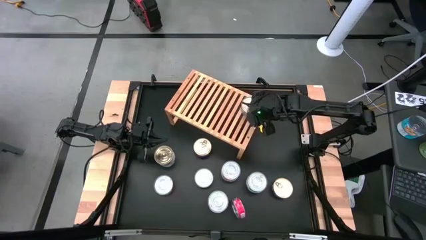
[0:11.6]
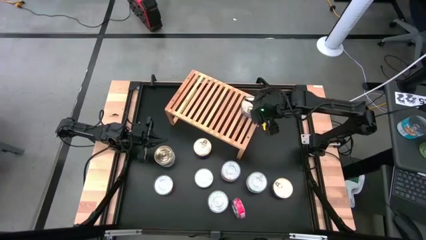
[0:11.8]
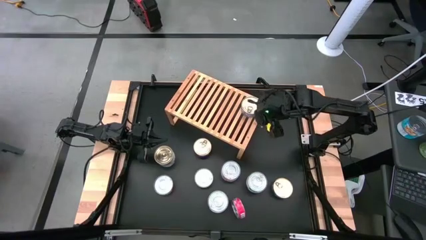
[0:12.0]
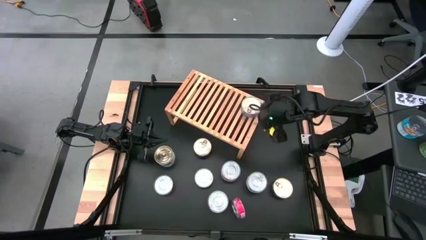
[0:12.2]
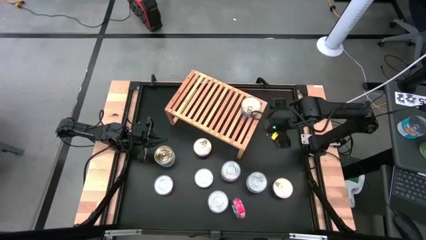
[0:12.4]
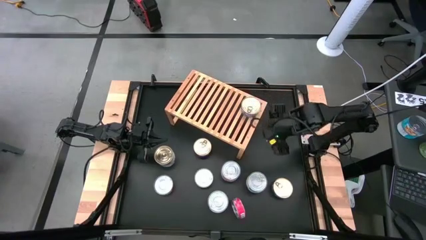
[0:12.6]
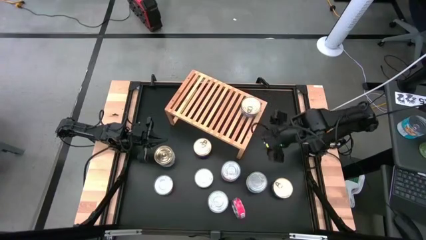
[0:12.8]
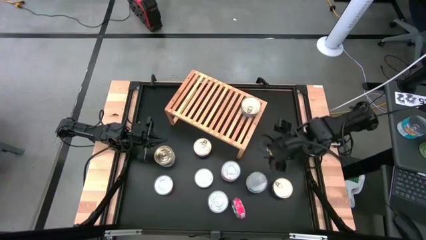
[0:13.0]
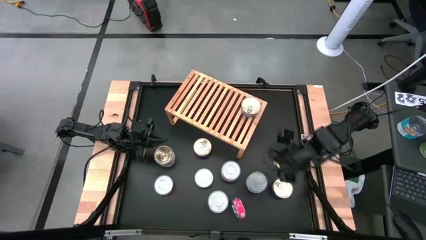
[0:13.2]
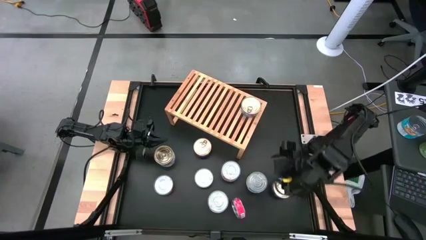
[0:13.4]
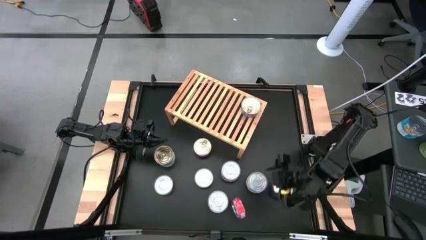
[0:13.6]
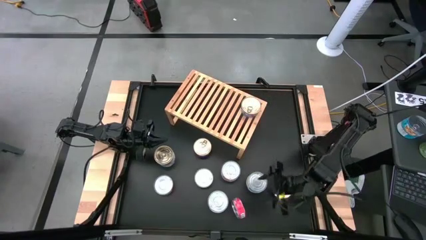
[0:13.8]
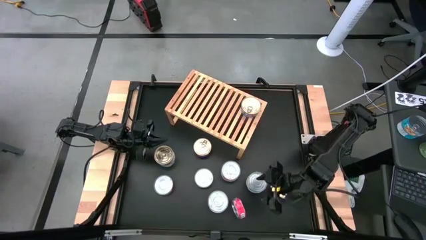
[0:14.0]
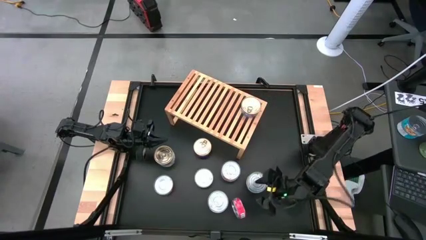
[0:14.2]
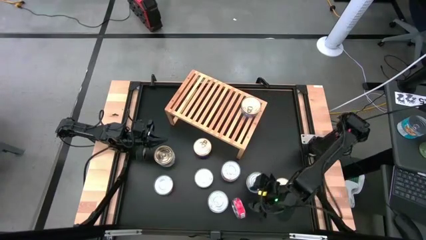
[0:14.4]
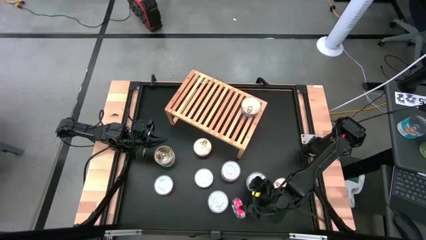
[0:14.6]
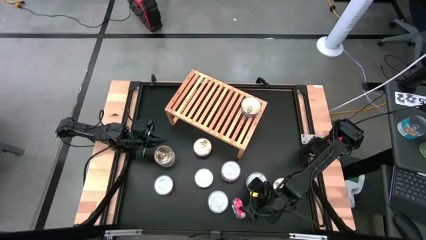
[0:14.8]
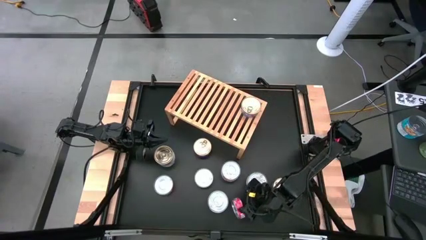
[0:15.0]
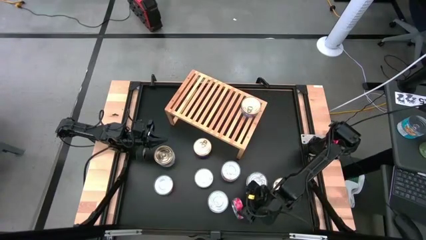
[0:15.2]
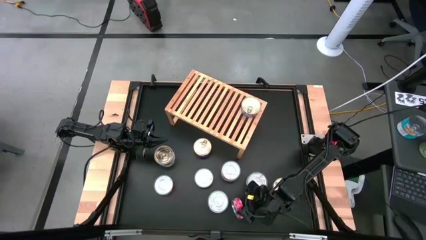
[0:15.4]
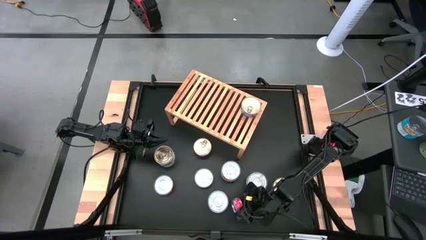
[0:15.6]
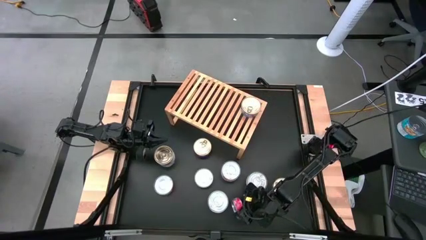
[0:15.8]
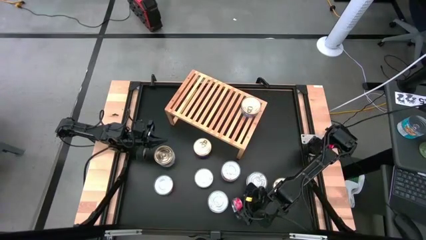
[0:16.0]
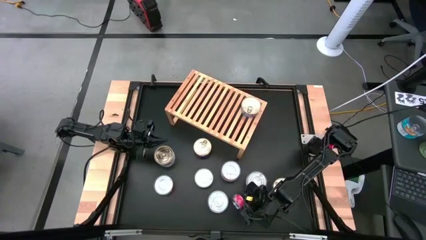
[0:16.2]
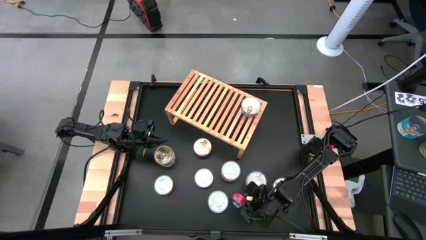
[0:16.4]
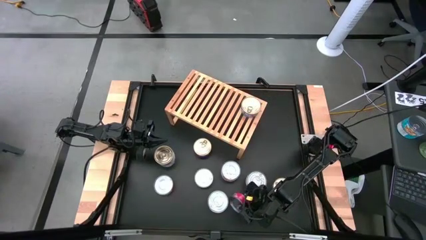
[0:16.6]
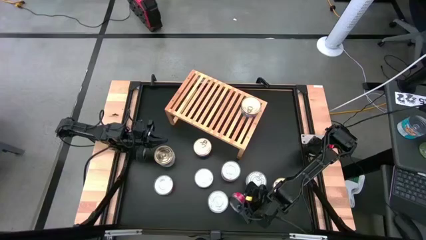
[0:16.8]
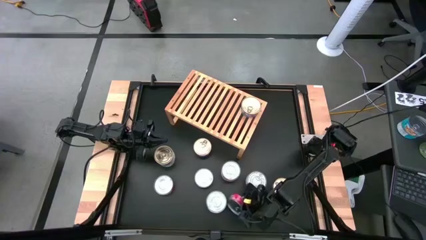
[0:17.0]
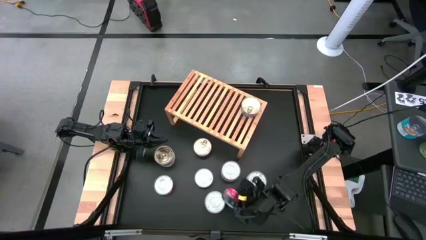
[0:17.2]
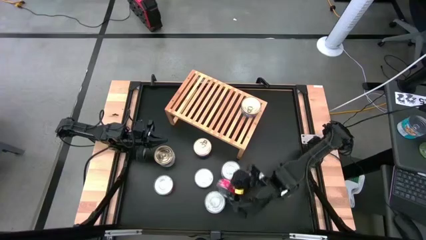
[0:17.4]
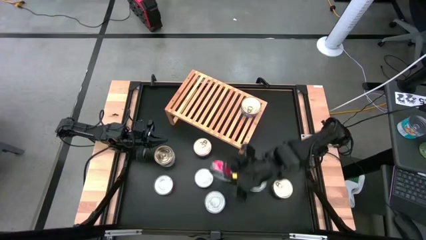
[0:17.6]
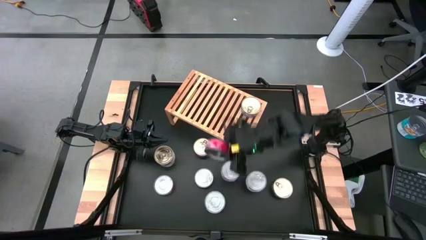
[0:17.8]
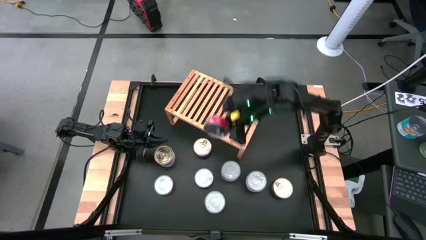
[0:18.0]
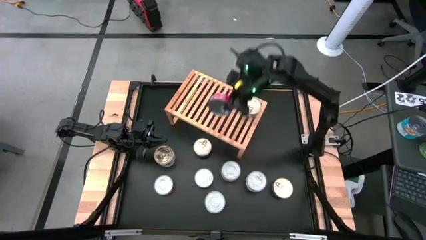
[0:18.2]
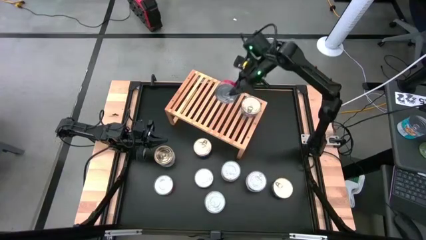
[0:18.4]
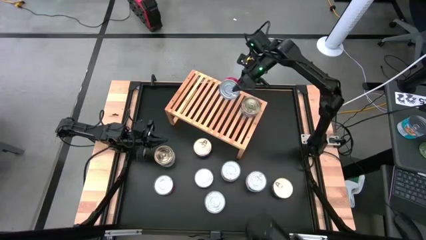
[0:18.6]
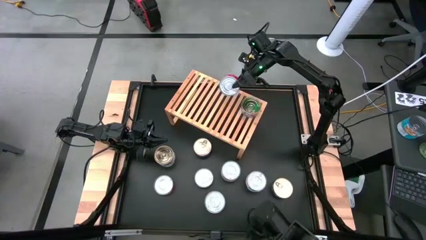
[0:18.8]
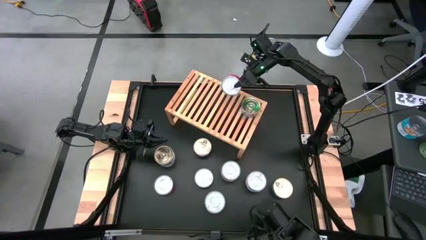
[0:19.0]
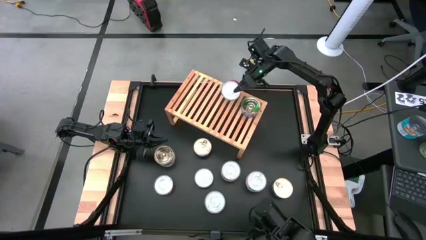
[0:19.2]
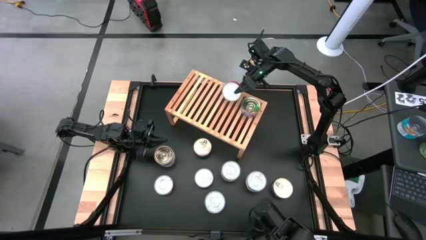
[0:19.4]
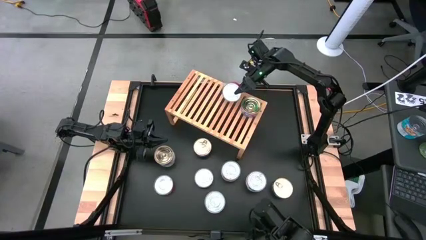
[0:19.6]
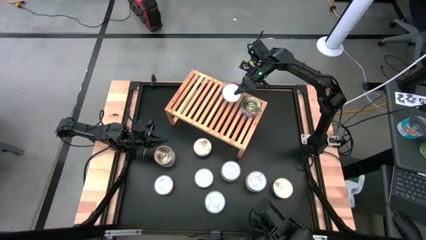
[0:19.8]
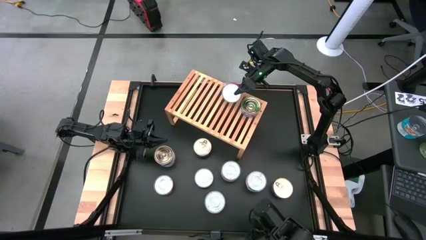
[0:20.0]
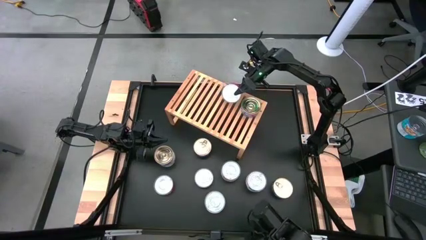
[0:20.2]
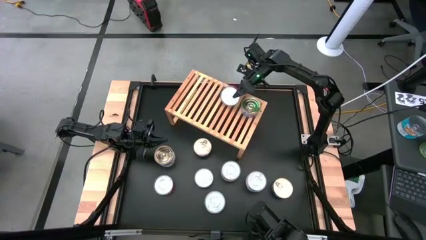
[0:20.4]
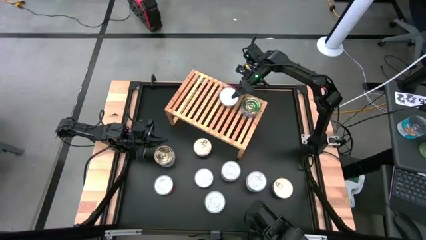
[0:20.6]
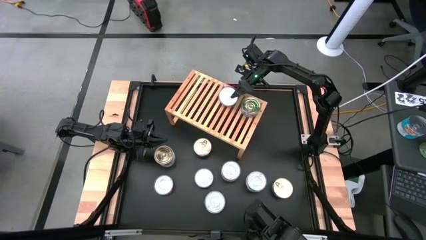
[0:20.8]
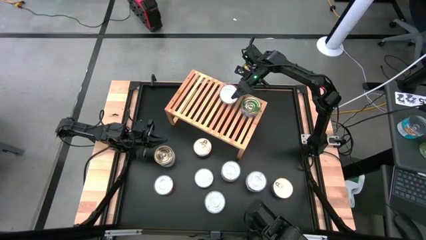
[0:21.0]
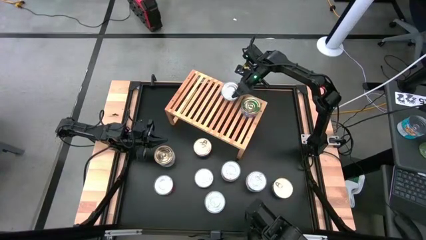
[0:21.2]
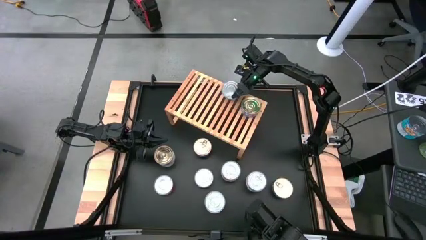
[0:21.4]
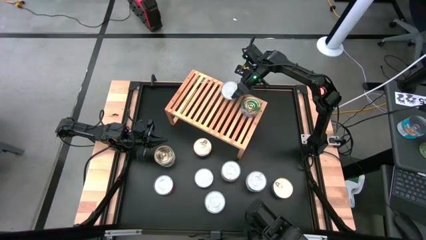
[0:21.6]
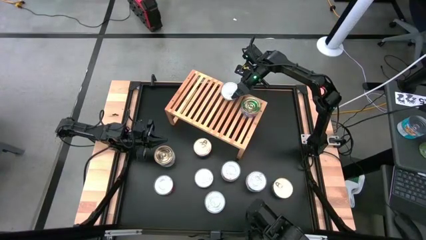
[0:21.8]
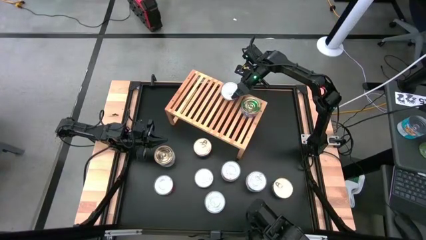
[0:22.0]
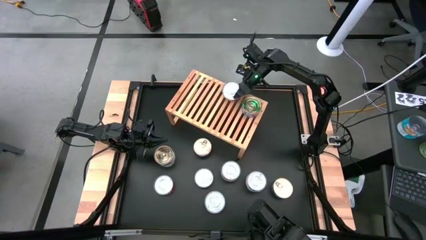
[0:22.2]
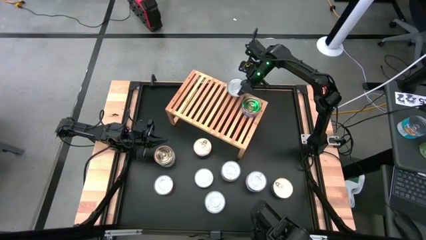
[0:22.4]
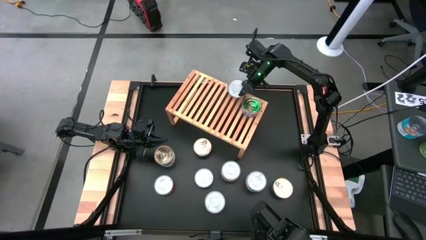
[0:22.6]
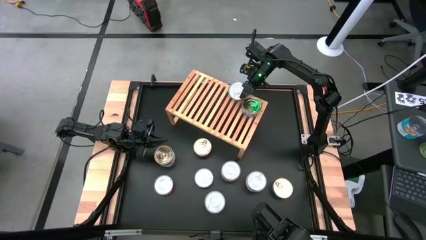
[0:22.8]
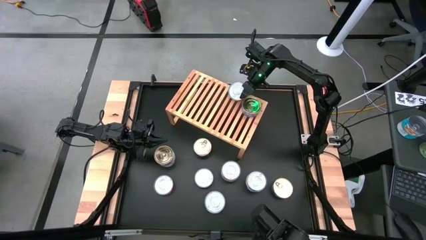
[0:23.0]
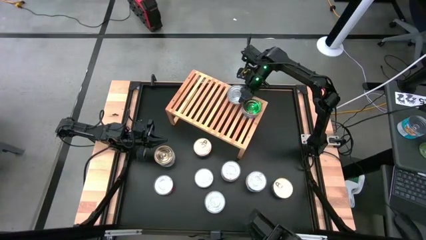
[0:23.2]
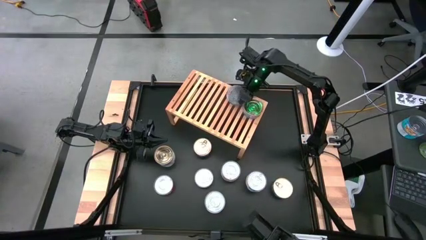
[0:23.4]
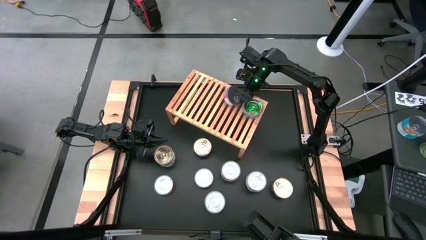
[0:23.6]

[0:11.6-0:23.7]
Task: Stack canned seafood by type on shelf
Put the red tuna can on the shelf

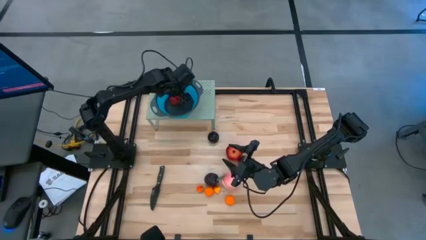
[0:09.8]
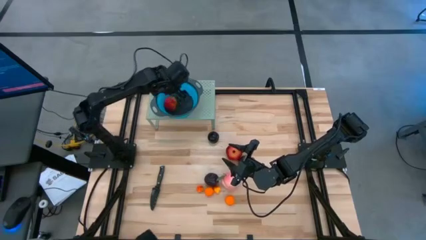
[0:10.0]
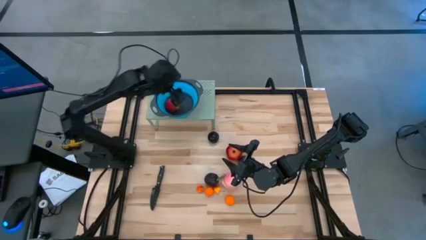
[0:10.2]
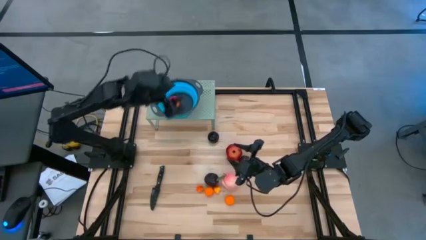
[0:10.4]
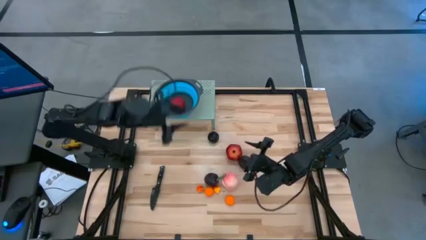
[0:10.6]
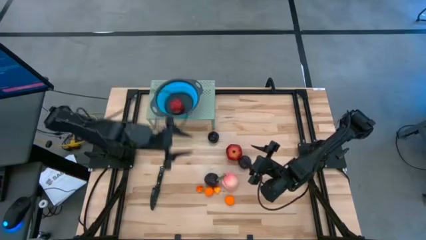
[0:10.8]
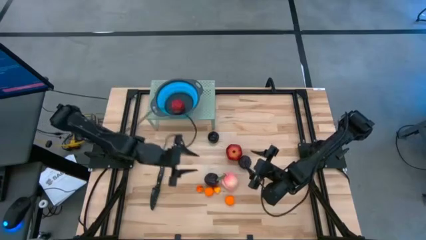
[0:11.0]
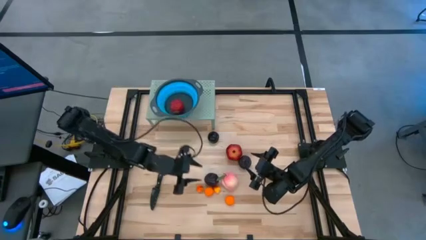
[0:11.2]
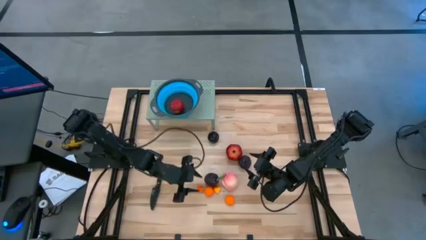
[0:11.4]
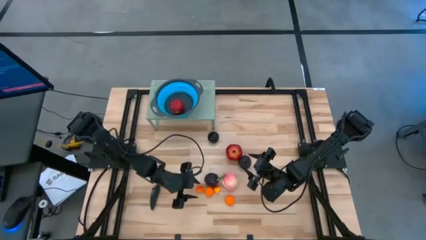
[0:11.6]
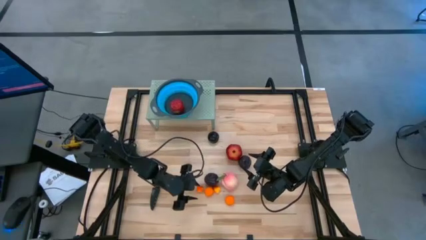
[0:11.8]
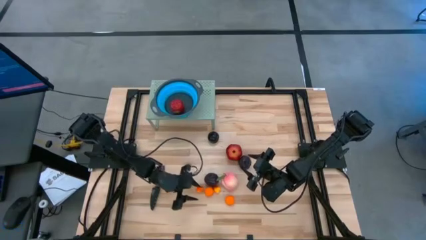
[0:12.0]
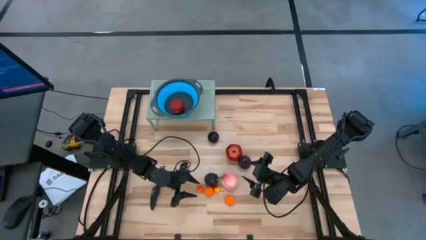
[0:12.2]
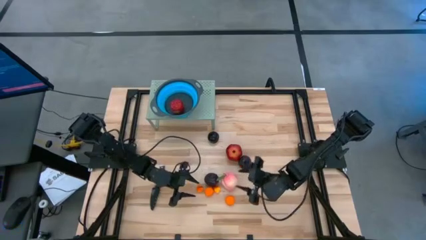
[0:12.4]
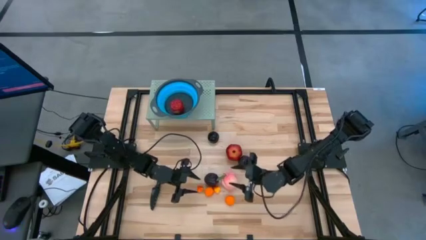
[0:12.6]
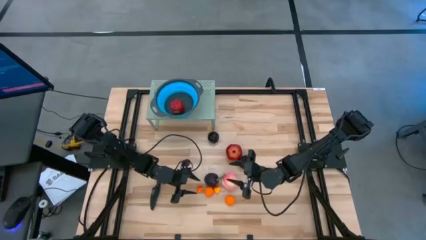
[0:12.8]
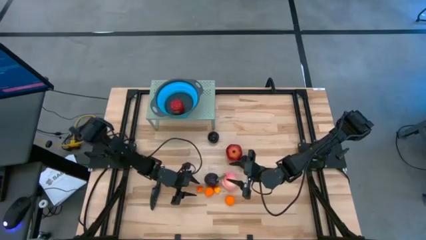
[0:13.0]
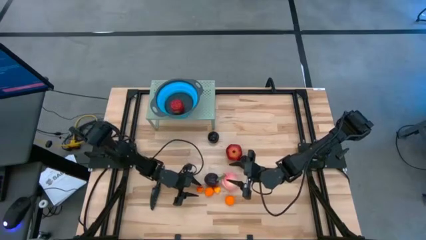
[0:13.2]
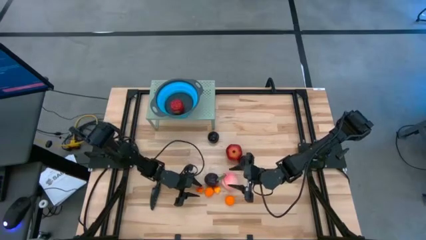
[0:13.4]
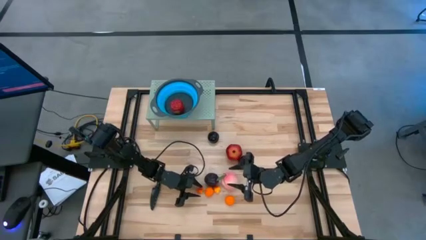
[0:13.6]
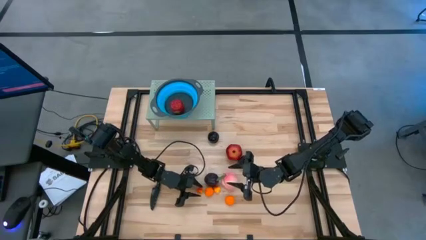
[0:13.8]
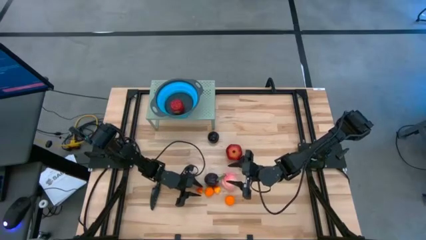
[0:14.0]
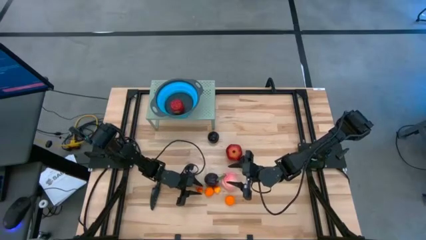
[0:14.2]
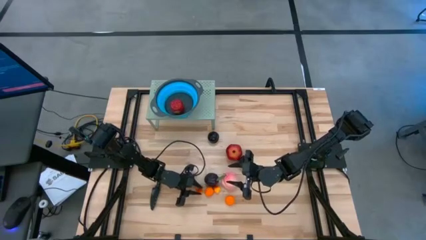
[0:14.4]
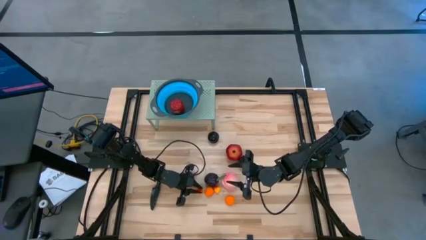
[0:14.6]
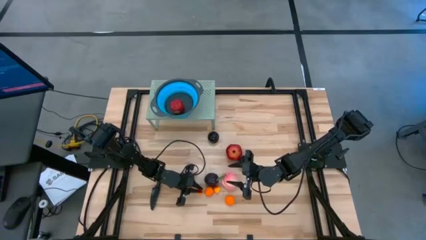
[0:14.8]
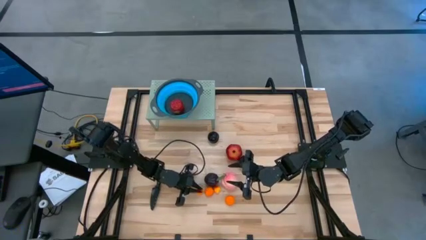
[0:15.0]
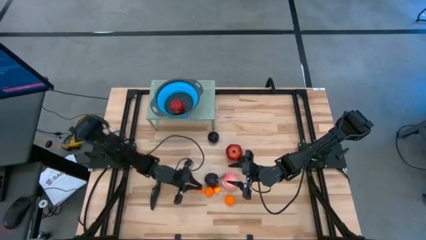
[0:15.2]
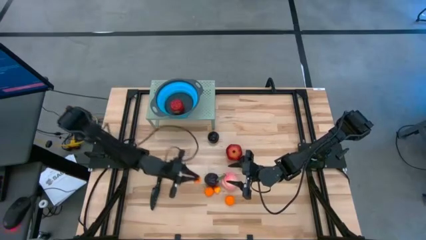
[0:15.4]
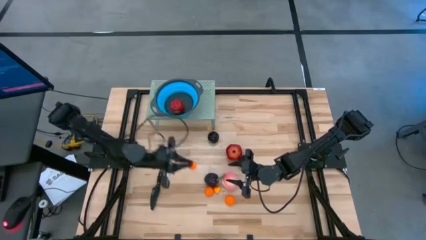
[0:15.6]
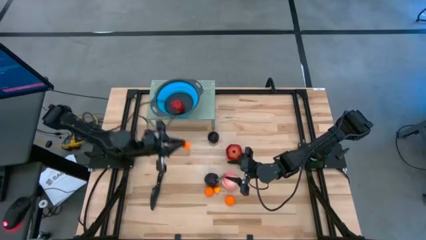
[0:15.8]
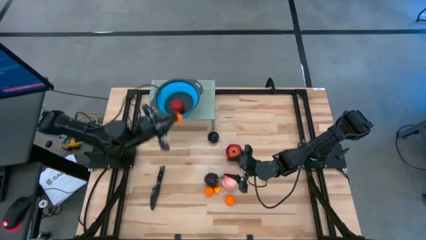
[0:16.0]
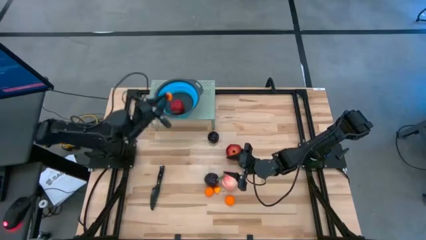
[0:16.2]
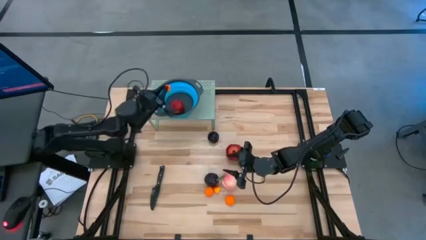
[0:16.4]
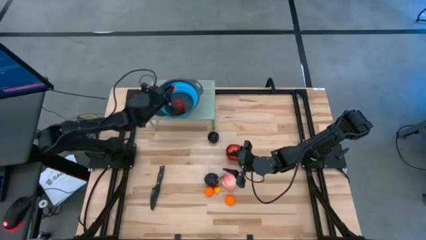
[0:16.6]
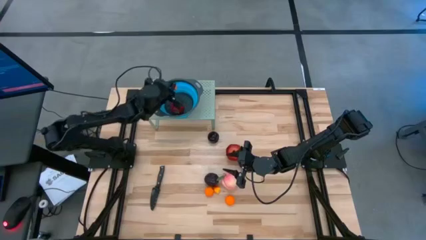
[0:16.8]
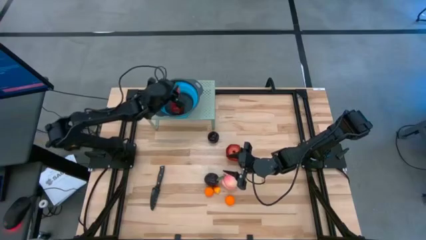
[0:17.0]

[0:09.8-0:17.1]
Task: Pick & Place Fruit
Put the left orange pear into the blue strainer bowl on the shelf
